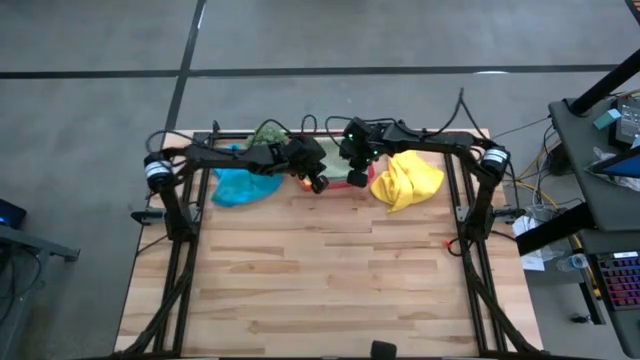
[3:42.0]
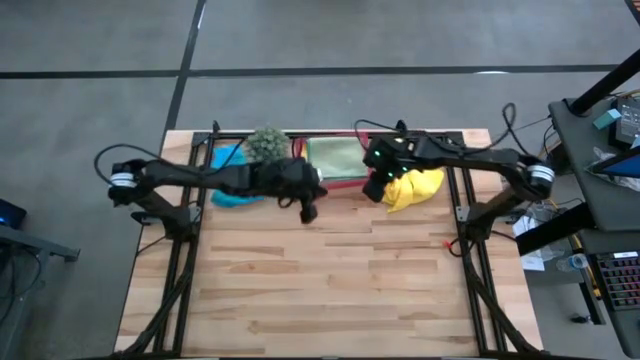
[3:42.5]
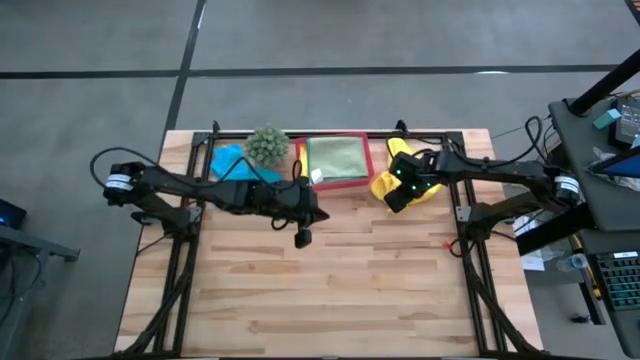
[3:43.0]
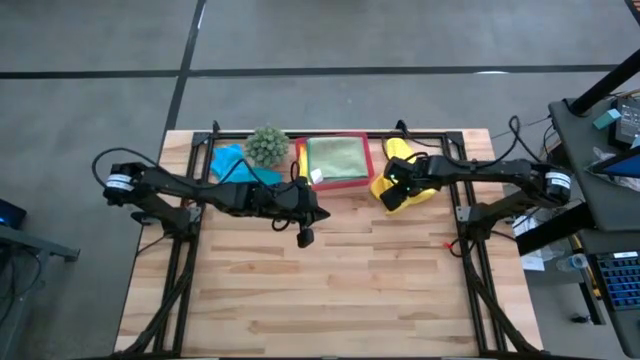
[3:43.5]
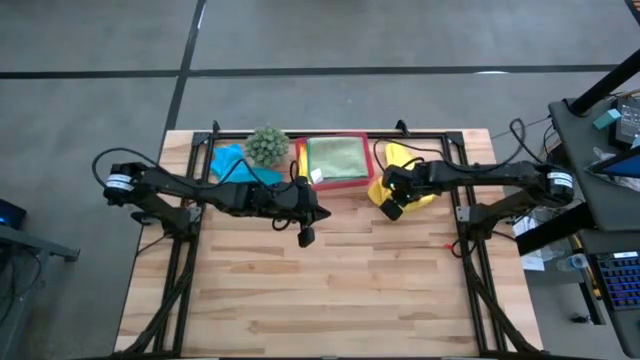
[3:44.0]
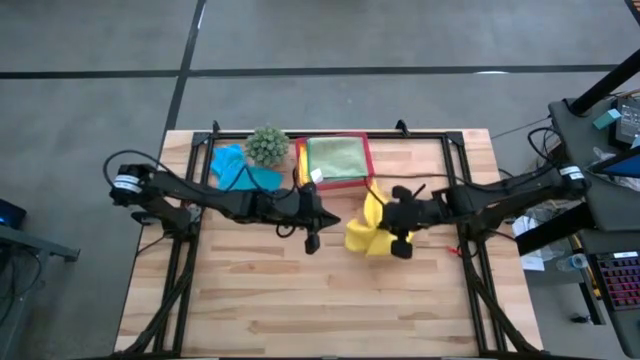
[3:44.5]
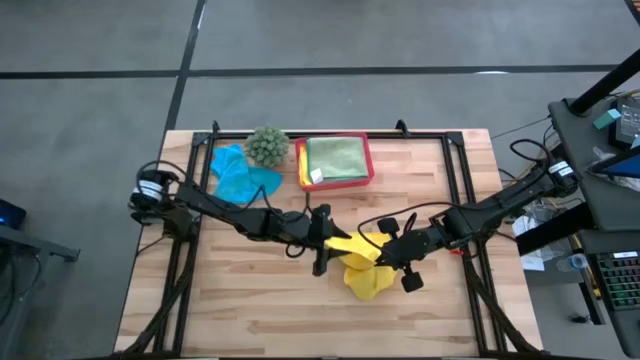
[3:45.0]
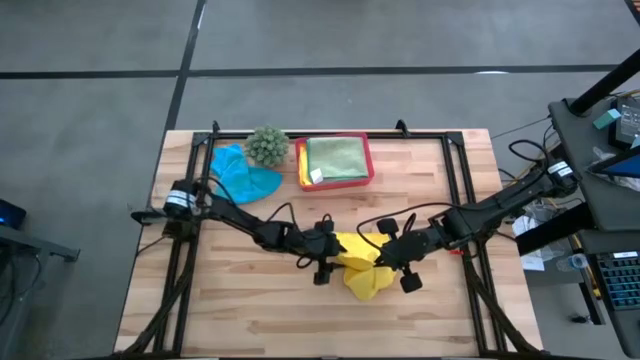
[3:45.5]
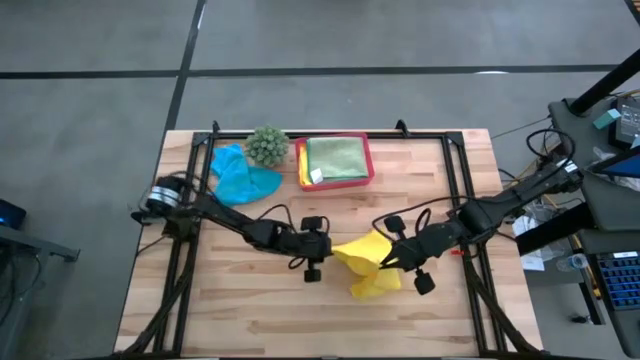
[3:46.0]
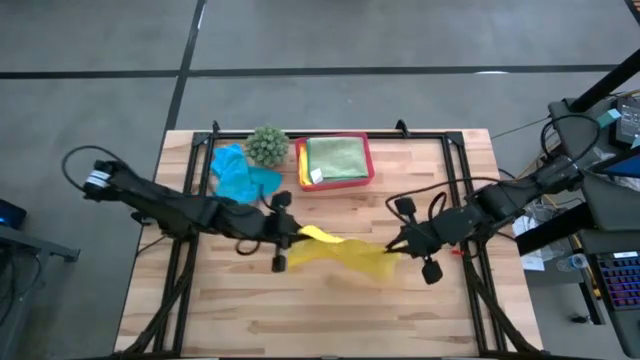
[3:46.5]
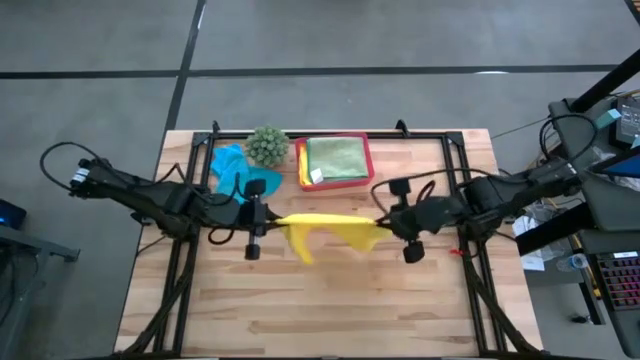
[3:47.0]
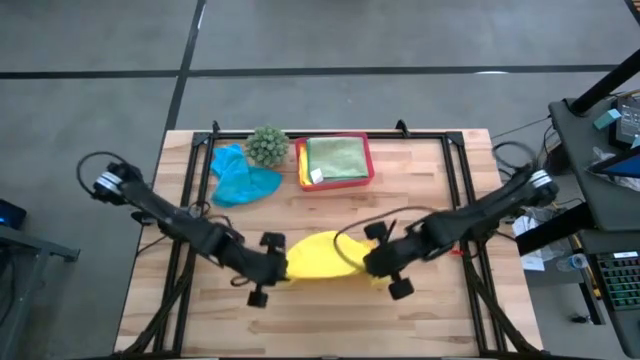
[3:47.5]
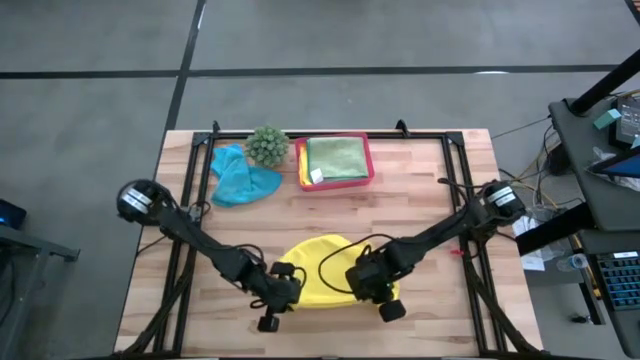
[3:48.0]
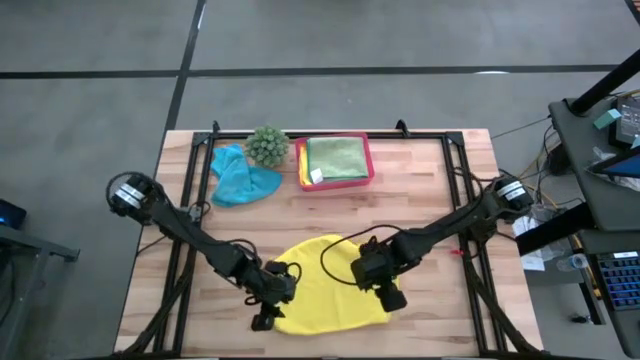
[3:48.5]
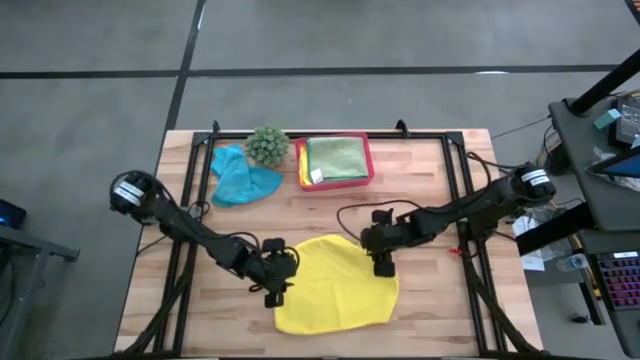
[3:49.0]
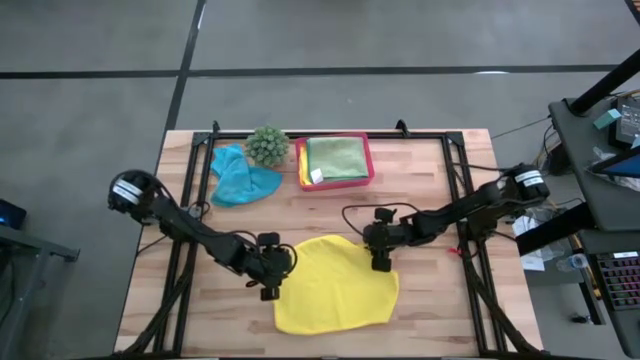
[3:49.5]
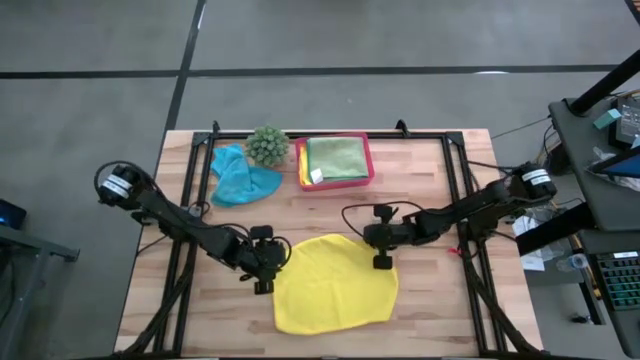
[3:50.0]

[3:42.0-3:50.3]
Task: Fold microfiber towels
Fold the yellow microfiber towel

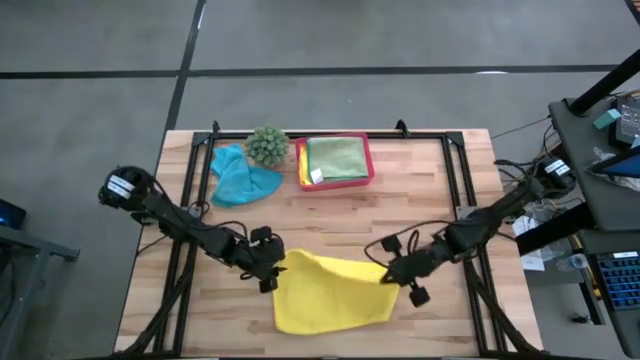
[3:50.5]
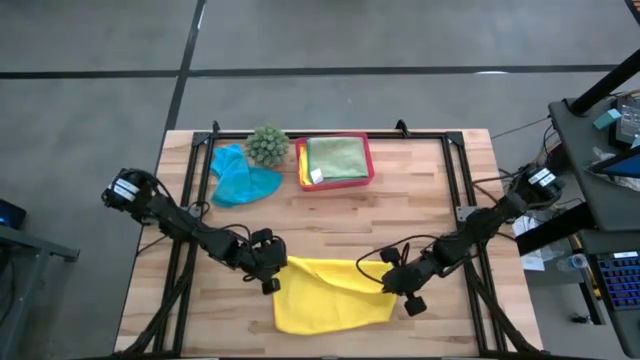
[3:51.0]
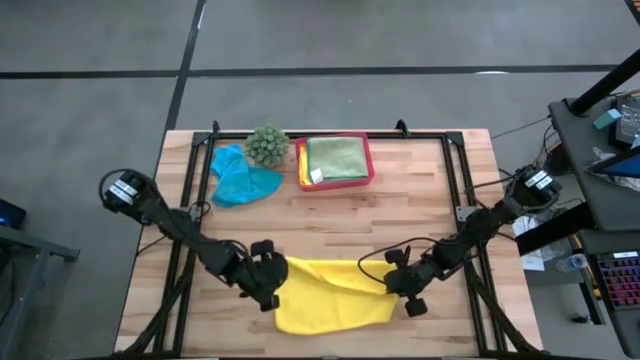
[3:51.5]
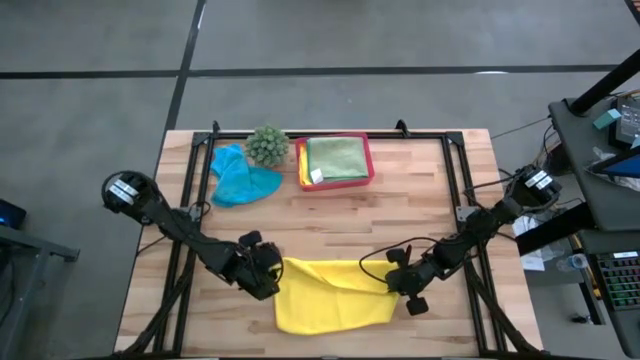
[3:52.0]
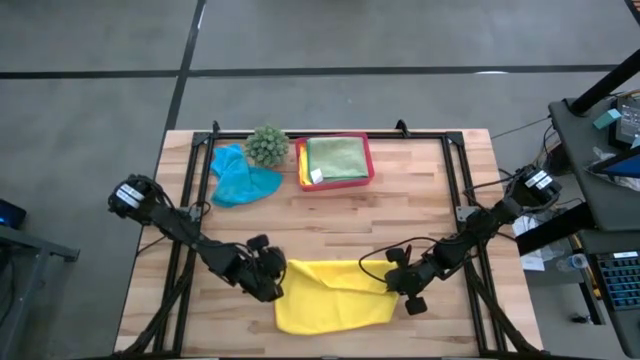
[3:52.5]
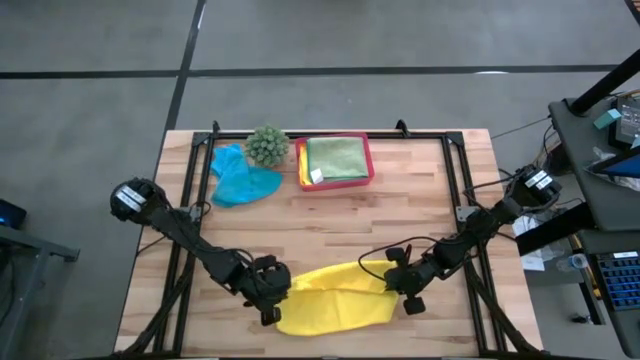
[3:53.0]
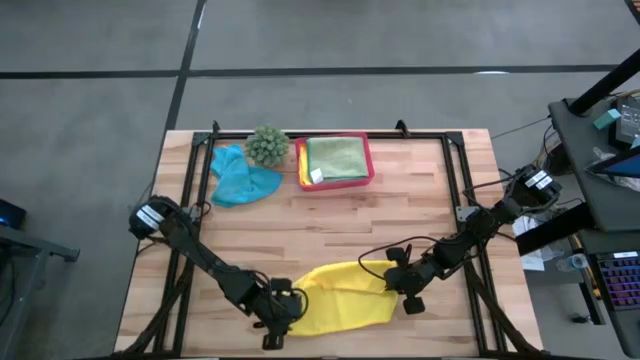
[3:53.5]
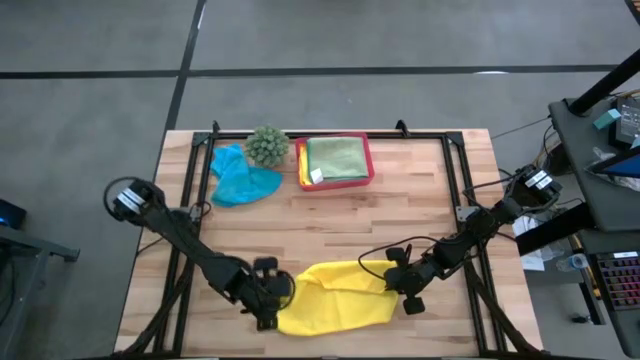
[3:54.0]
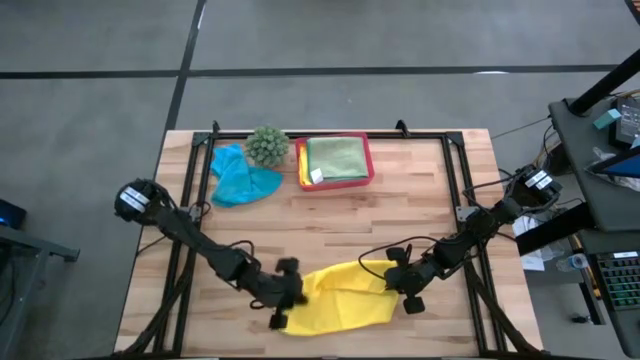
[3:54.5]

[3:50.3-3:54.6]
Fold the yellow microfiber towel

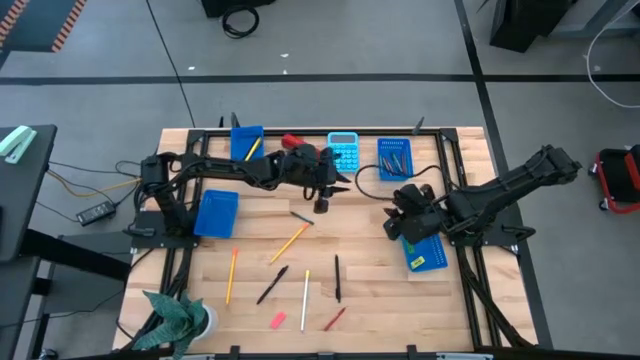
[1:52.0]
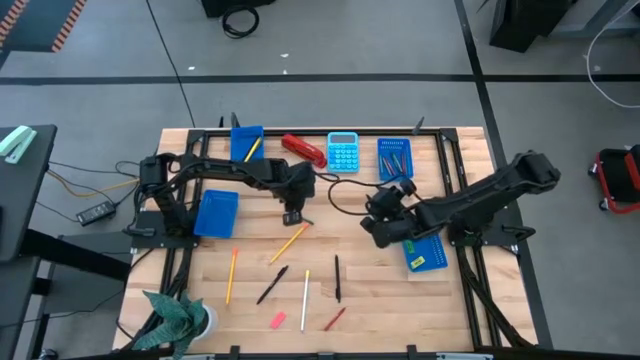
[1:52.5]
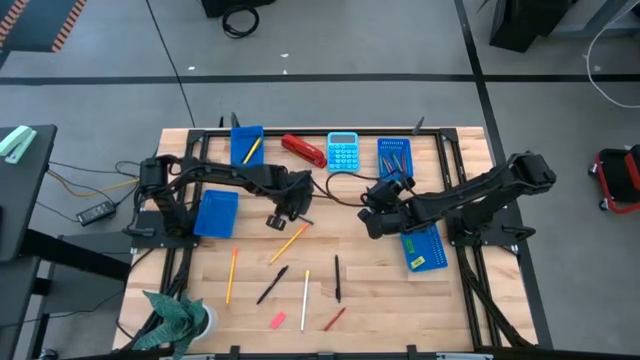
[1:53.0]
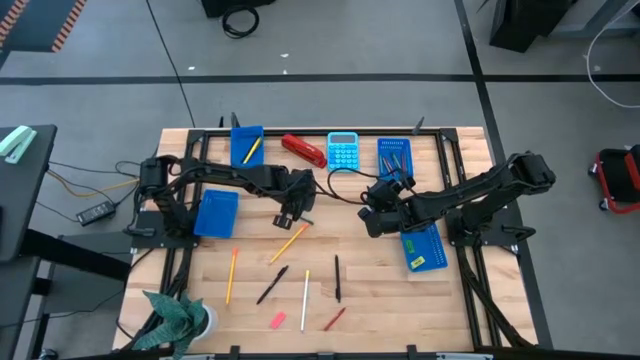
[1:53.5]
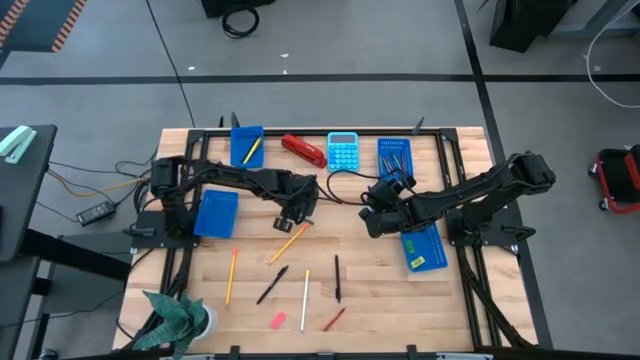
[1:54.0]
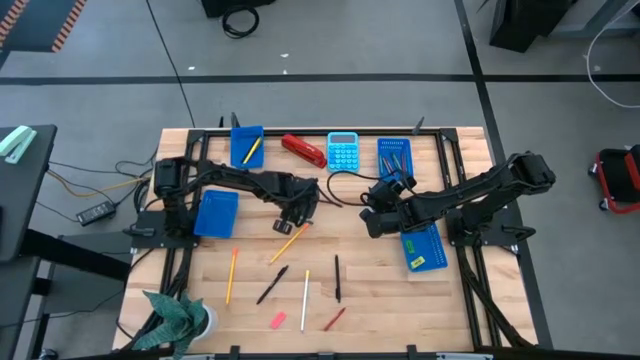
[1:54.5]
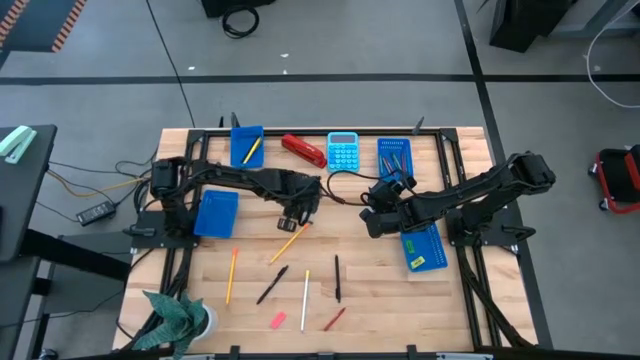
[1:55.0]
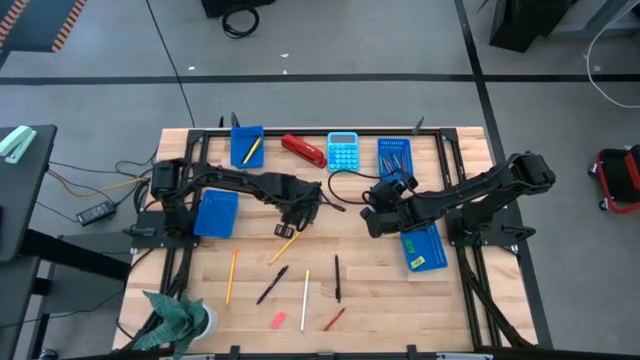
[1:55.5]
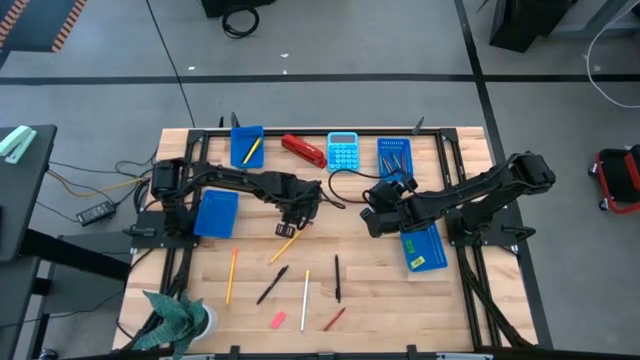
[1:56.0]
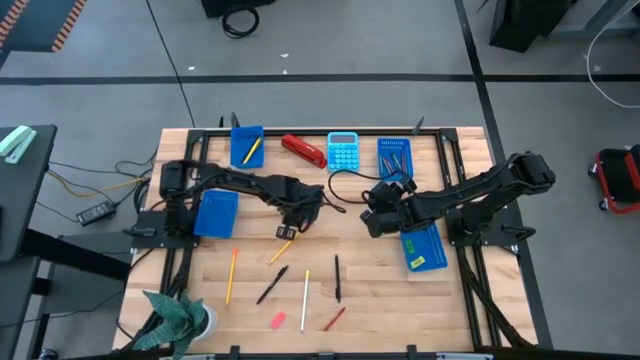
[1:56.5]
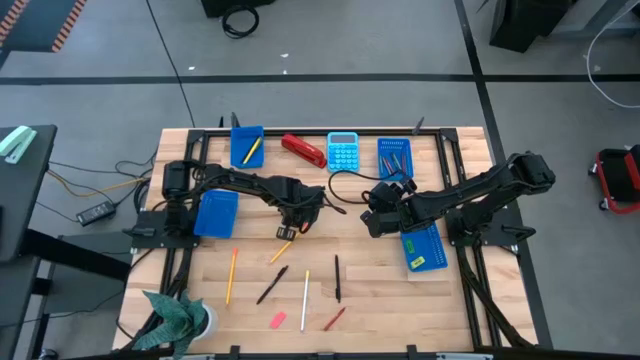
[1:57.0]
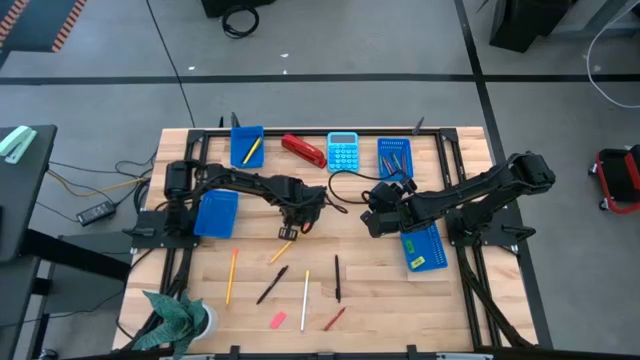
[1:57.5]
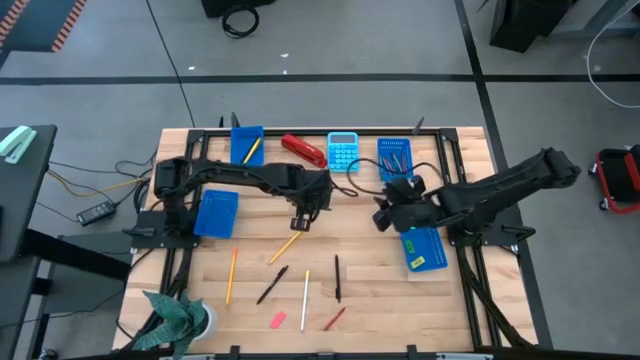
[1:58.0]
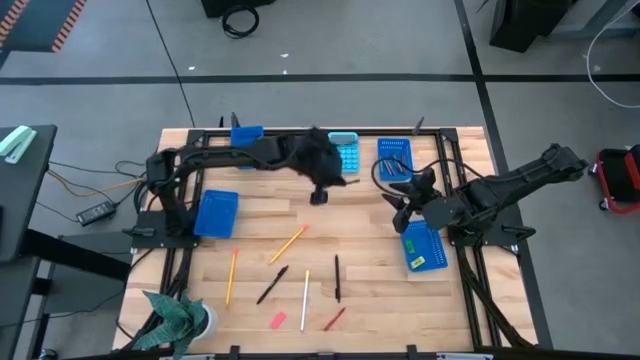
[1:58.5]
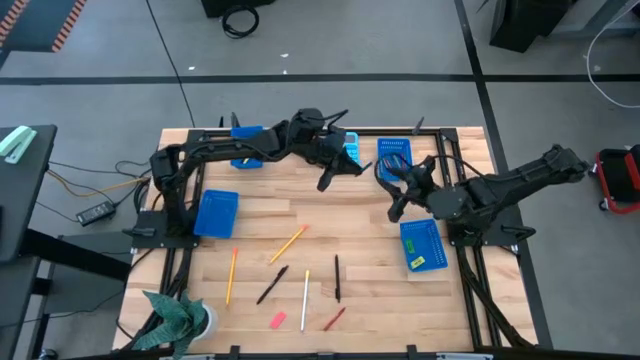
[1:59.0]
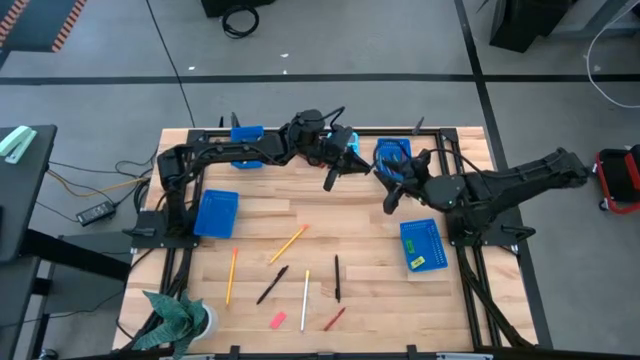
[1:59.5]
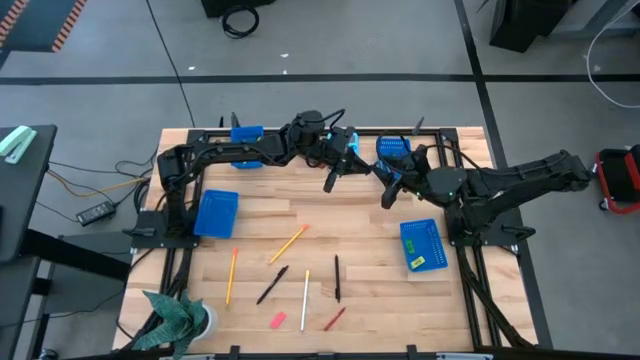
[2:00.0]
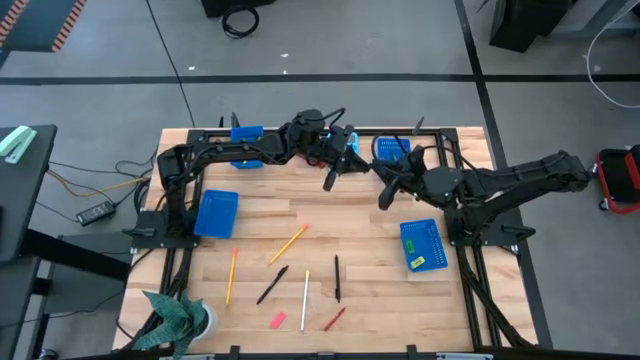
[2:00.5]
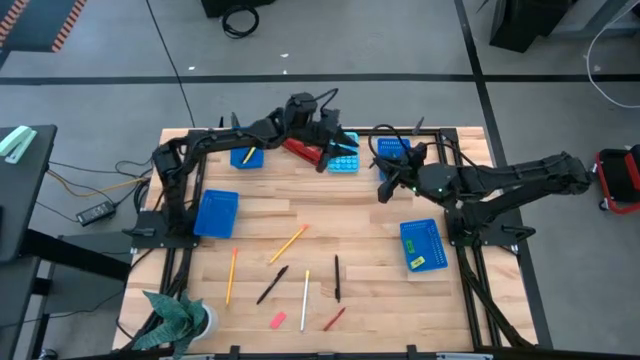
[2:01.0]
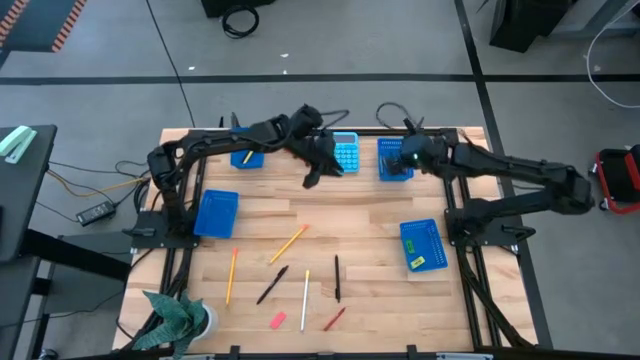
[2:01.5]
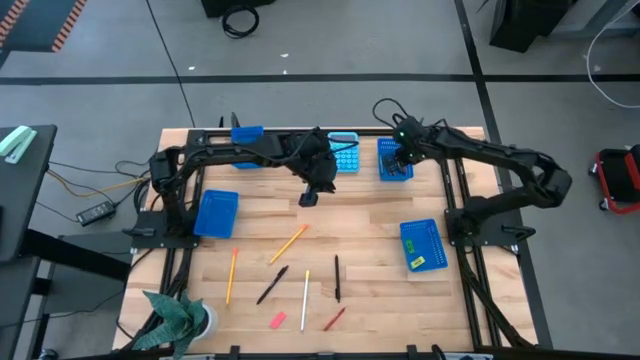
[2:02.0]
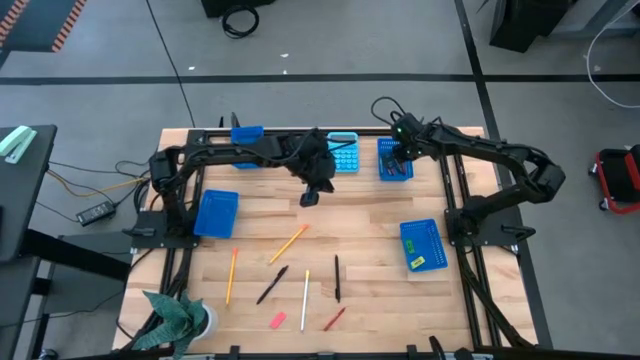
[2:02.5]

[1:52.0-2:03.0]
Task: Sort crayons/erasers/pens/pencils in bins
Put the green crayon into the top right bin
